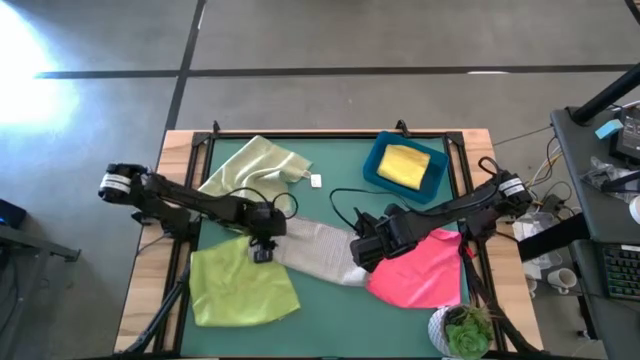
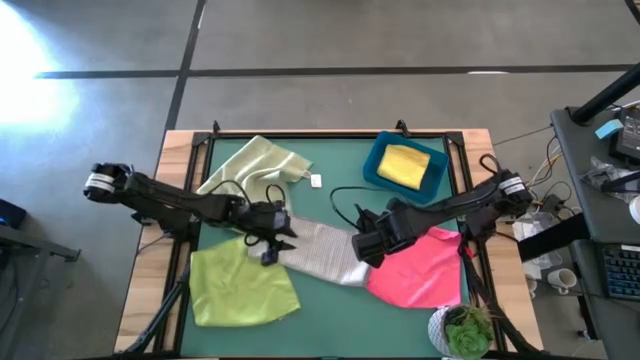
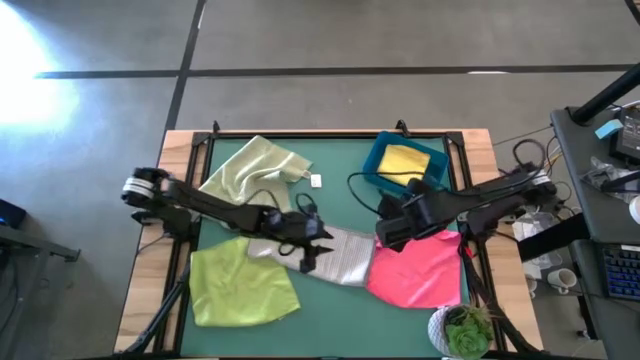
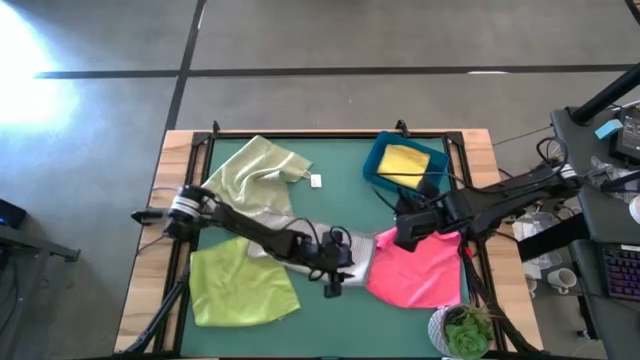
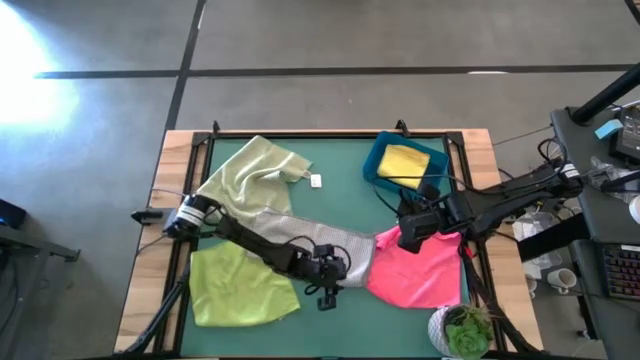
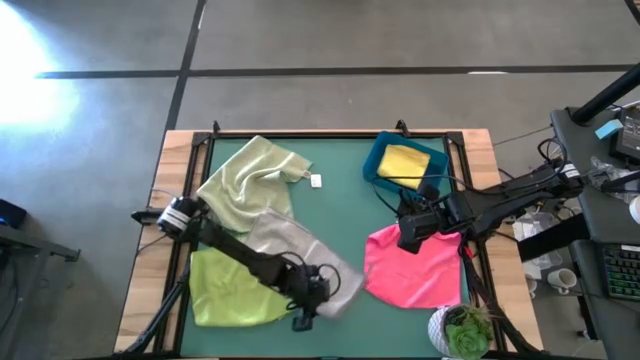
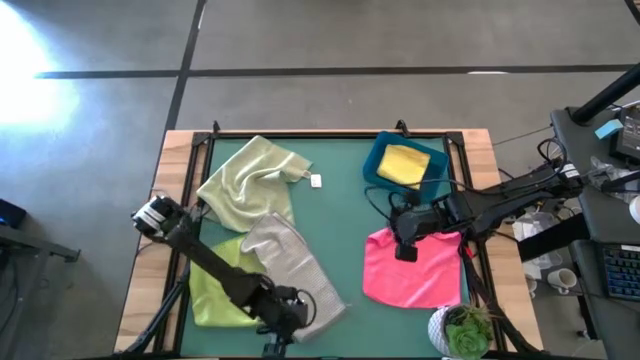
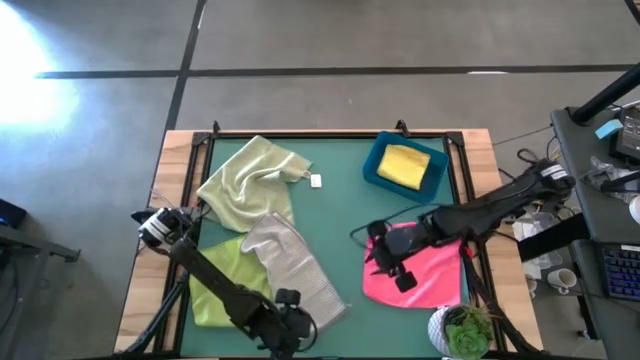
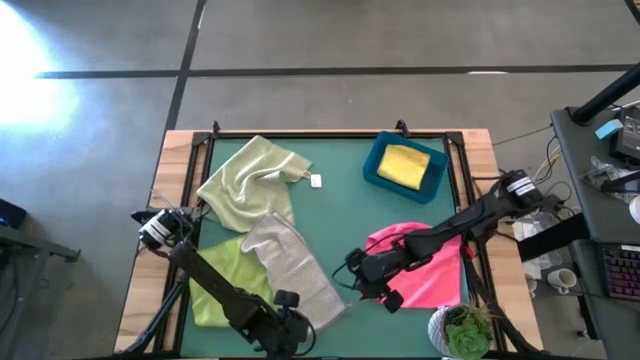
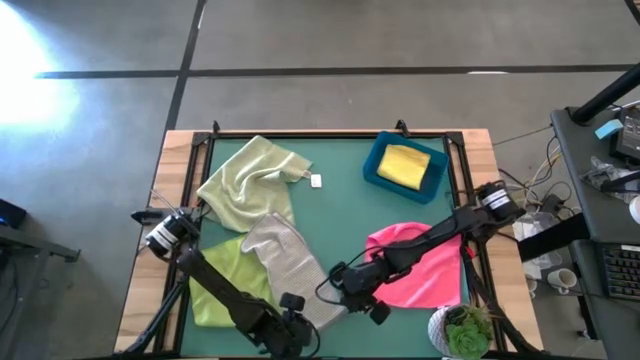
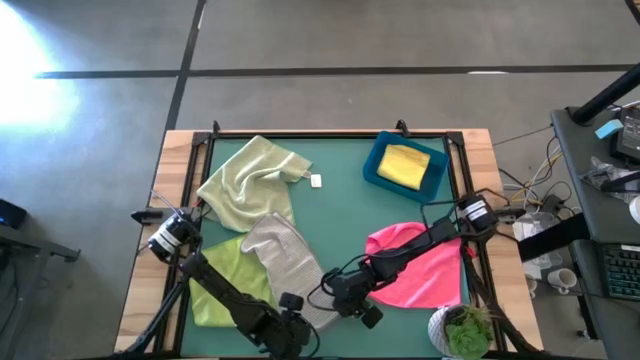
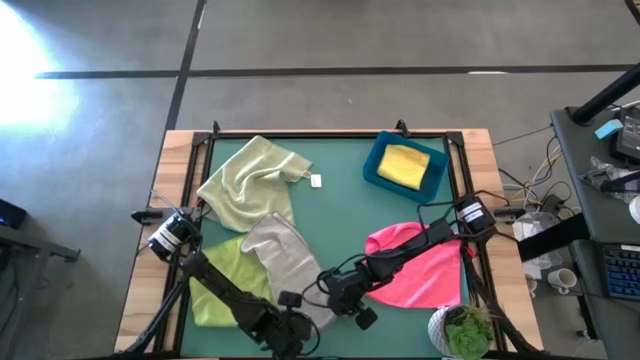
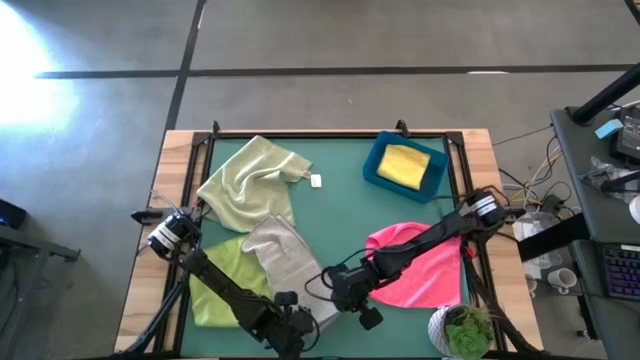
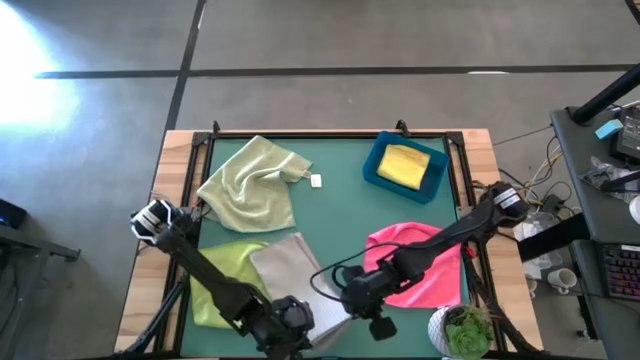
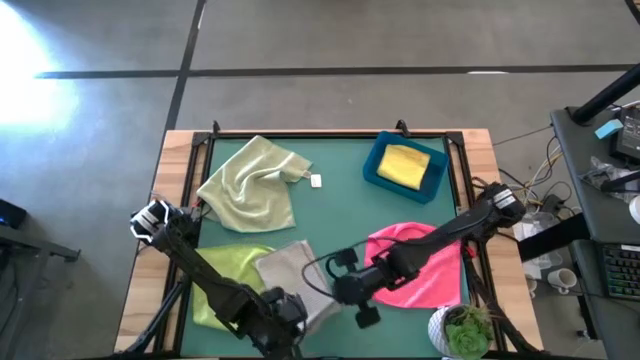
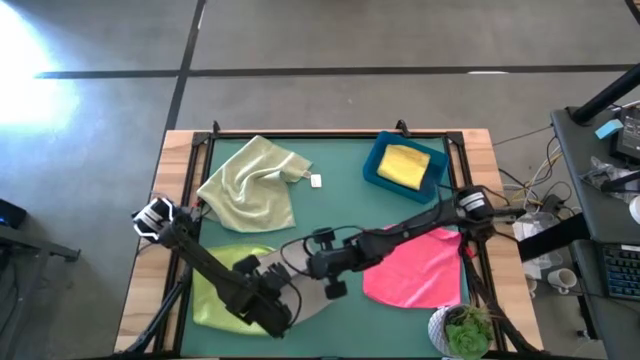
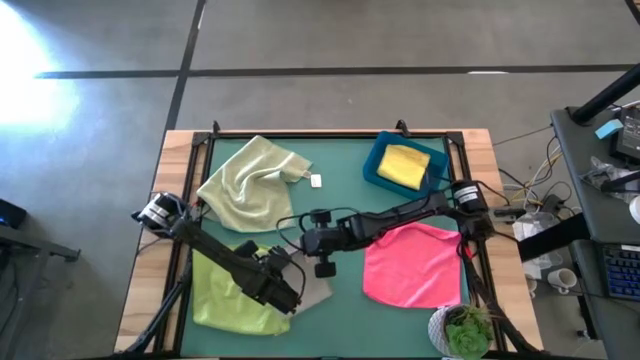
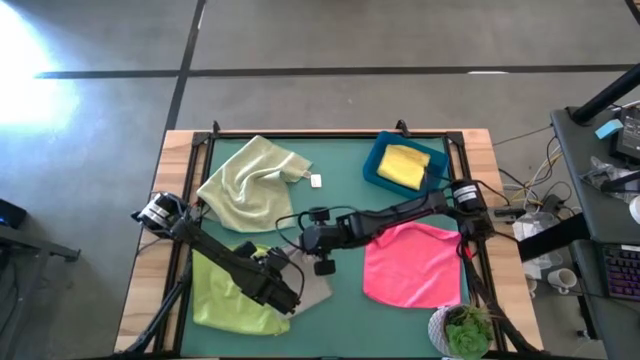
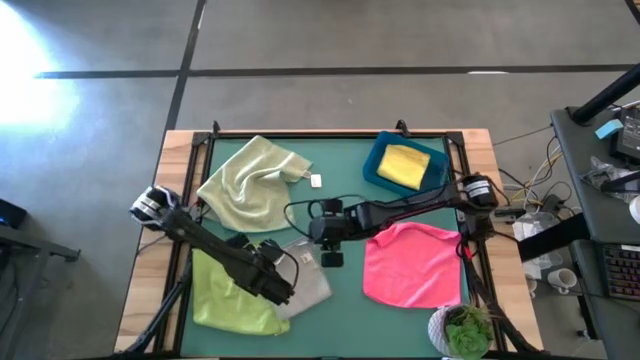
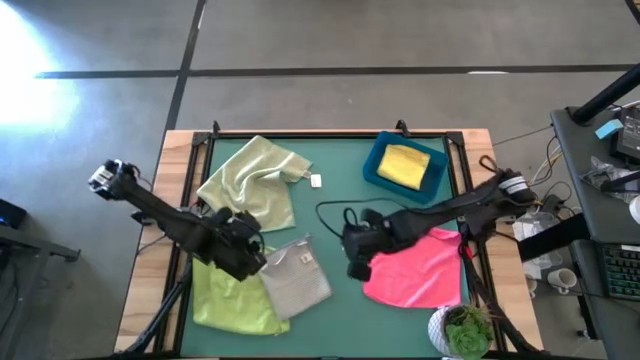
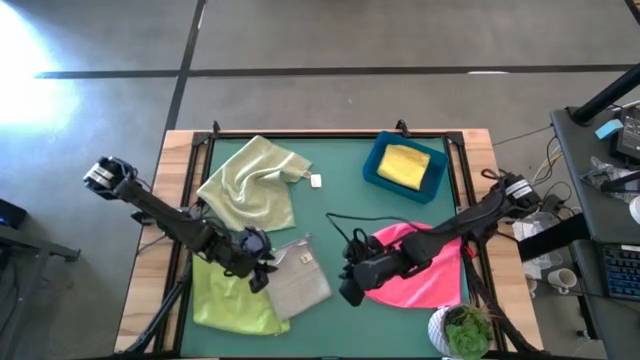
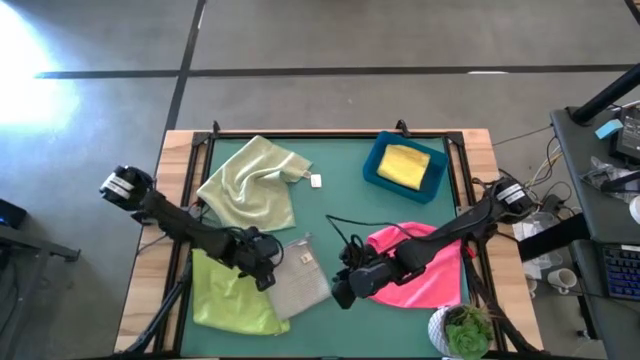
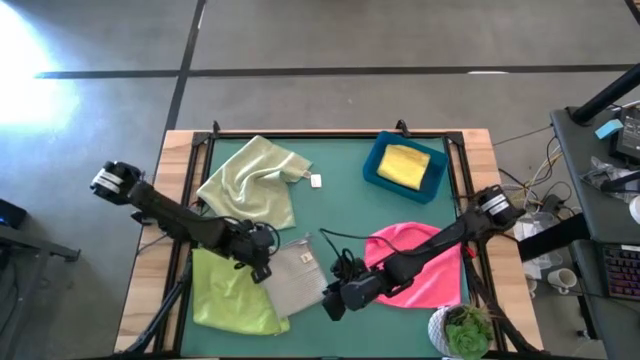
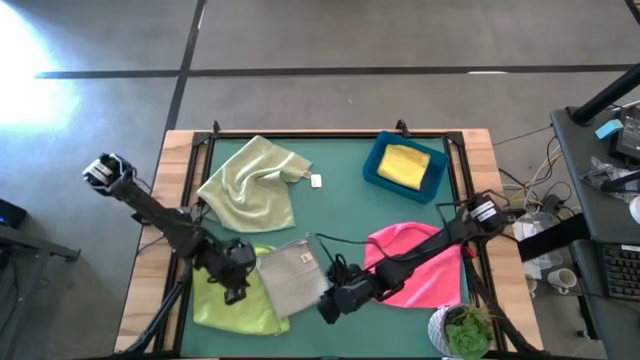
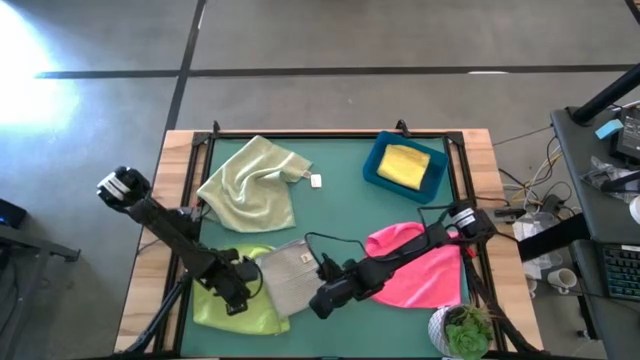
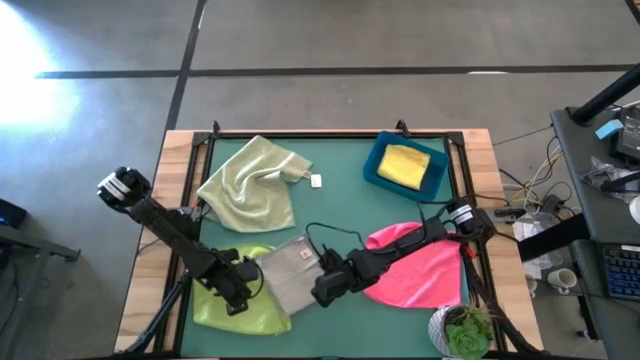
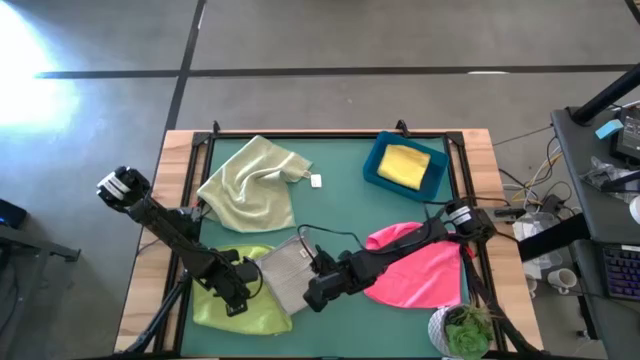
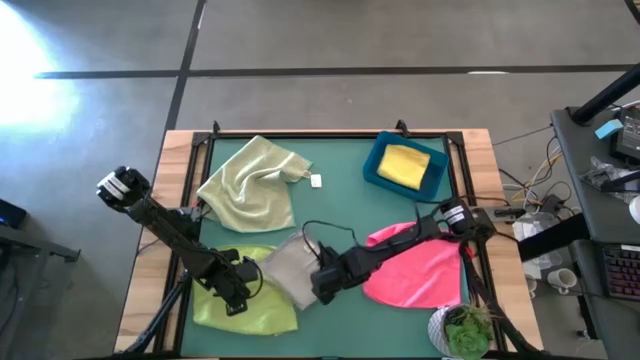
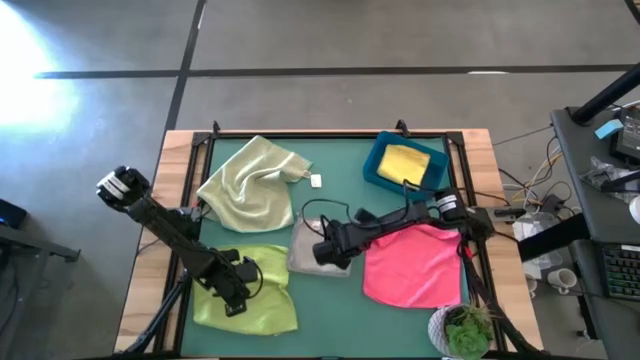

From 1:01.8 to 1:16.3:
Task: Fold microfiber towels
Fold the gray microfiber cloth

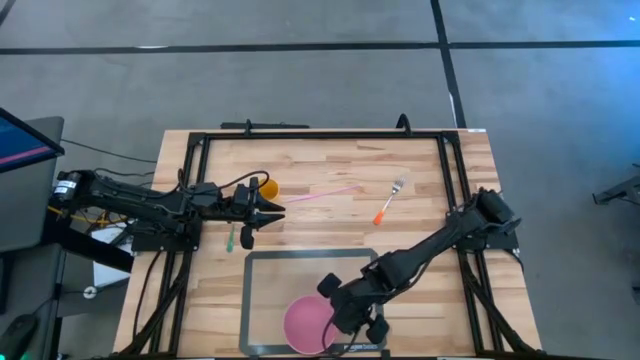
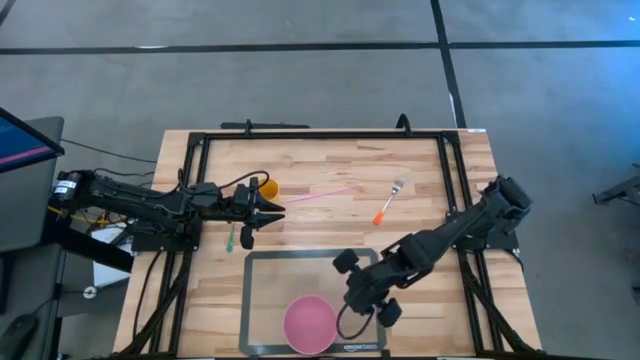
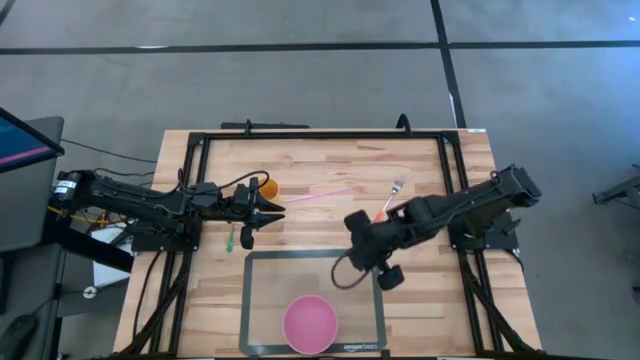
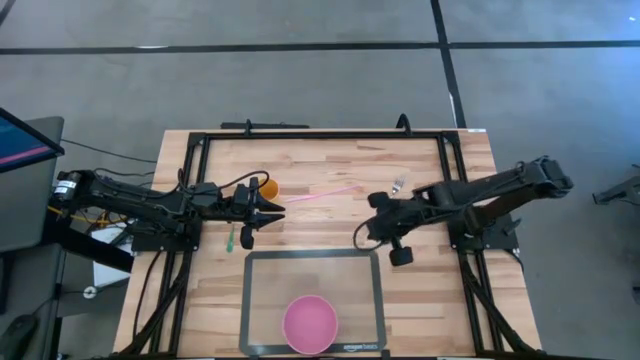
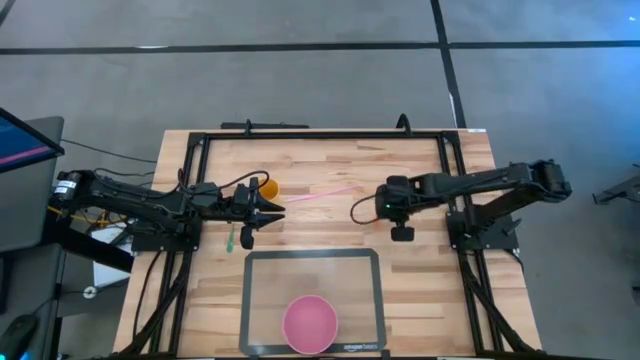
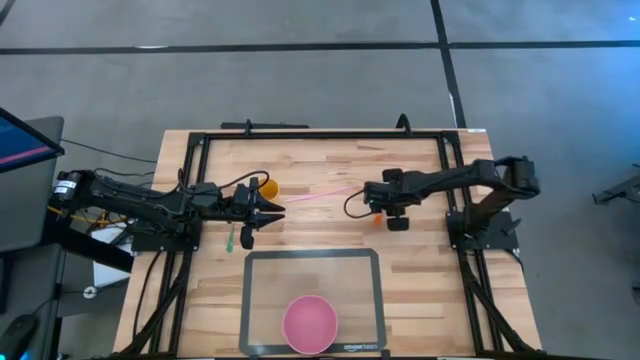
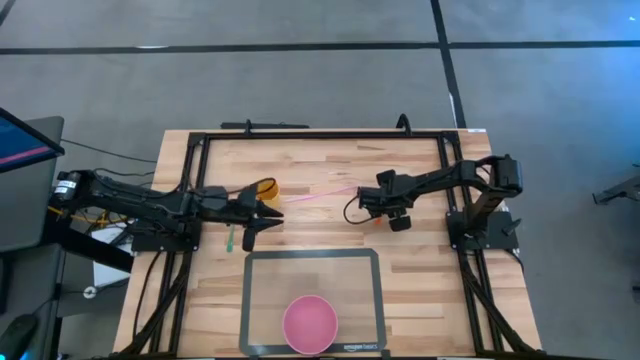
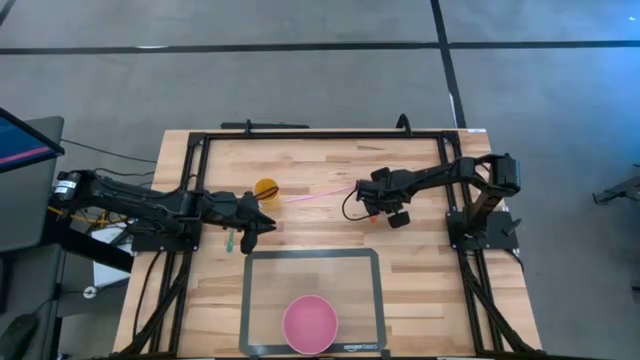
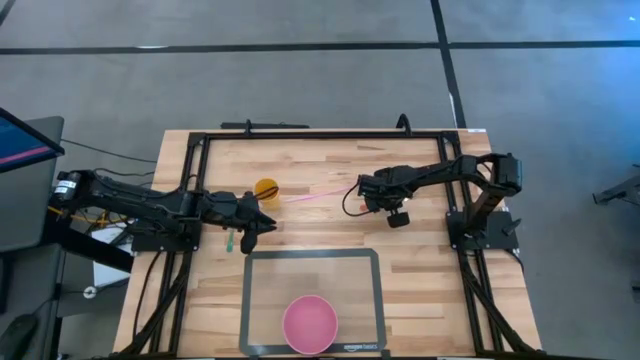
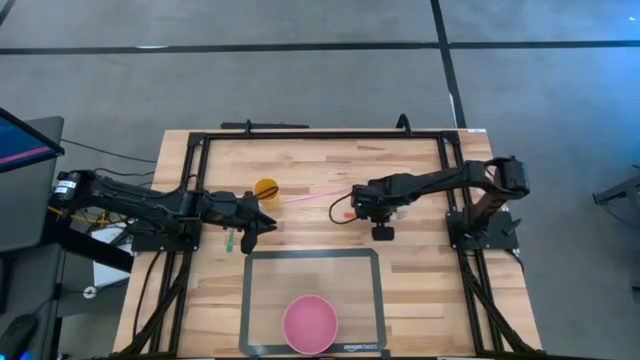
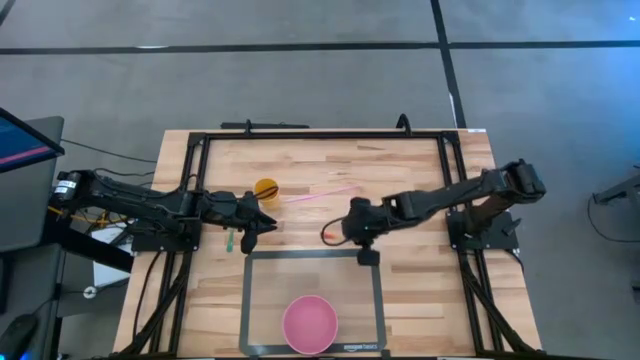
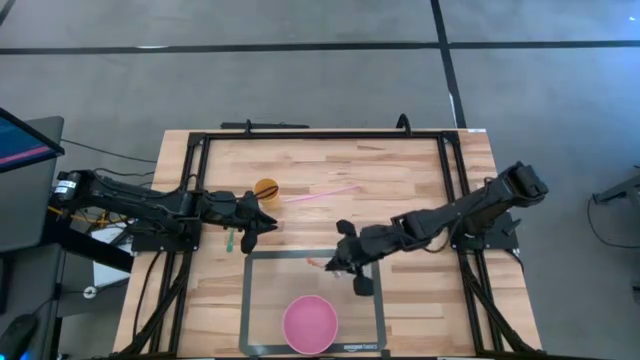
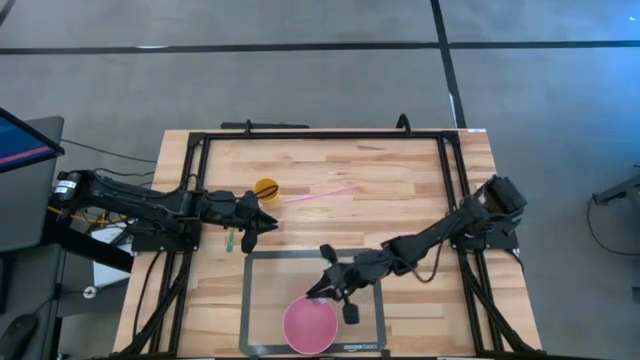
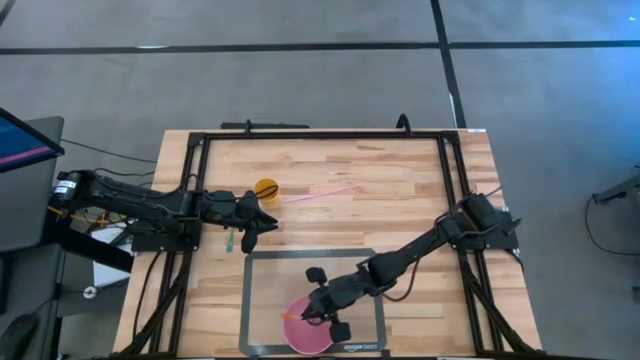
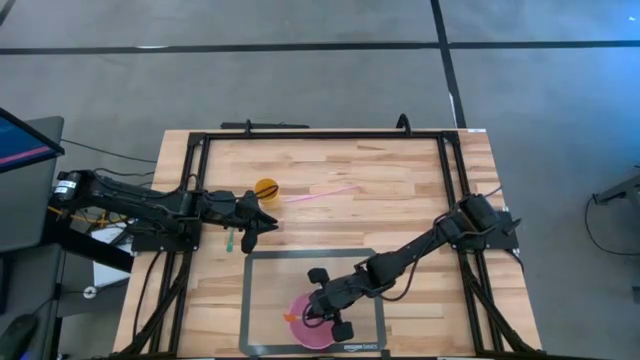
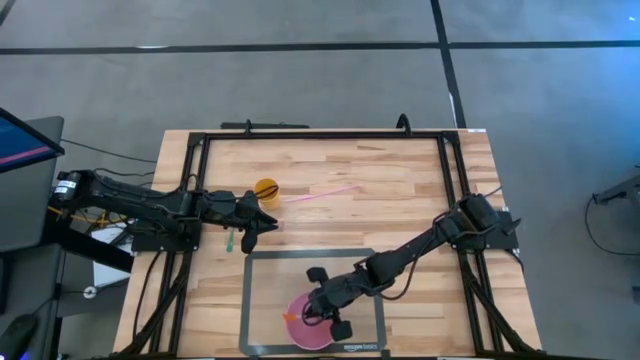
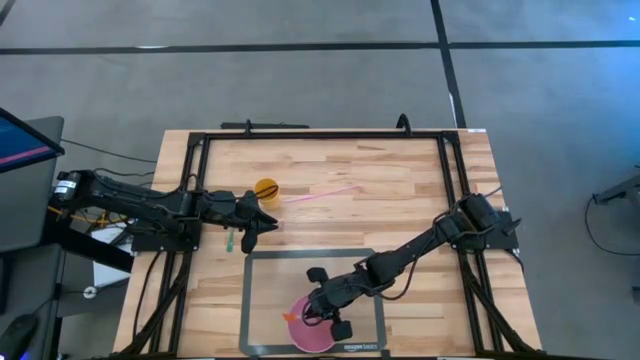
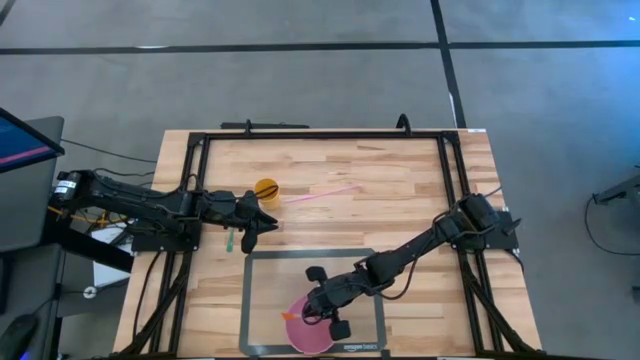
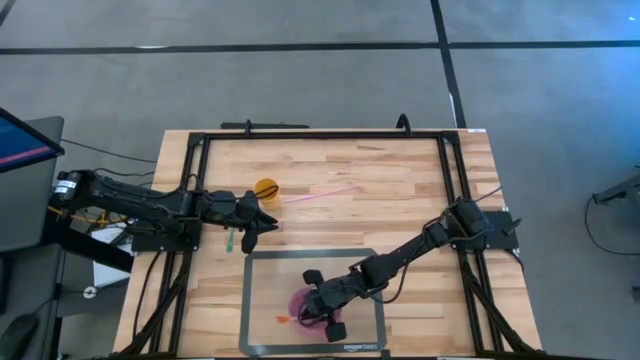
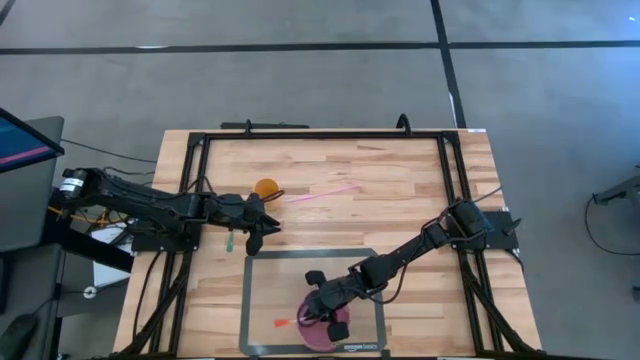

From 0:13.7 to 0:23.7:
Task: Pick & Place Utensil
Put the orange fork into the pink bowl on the transparent mat
